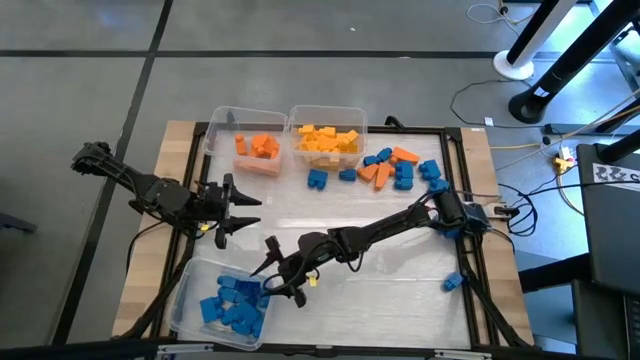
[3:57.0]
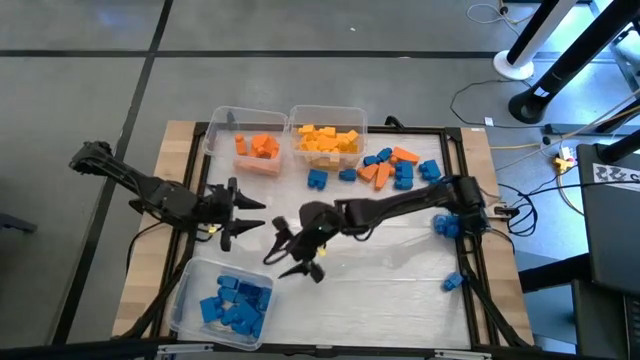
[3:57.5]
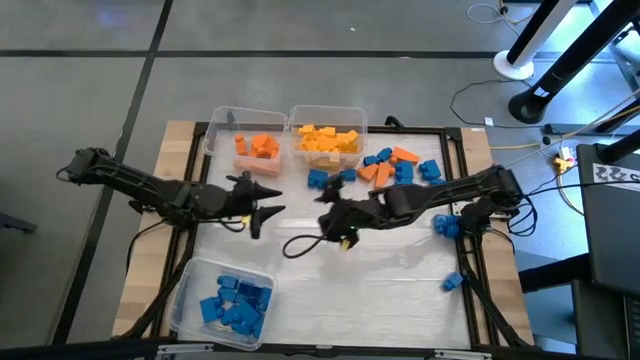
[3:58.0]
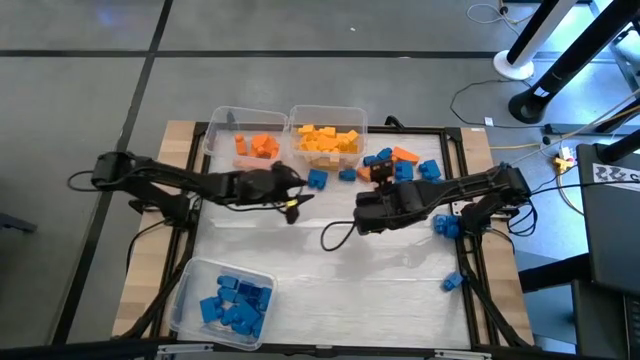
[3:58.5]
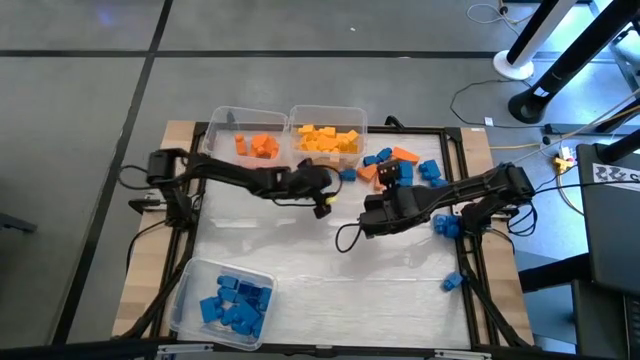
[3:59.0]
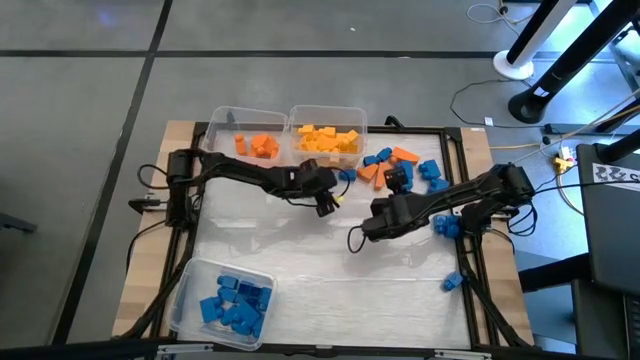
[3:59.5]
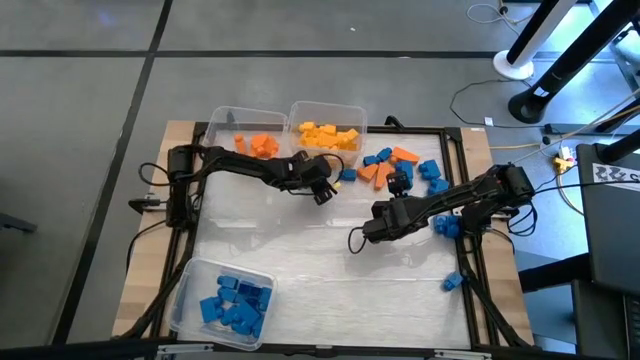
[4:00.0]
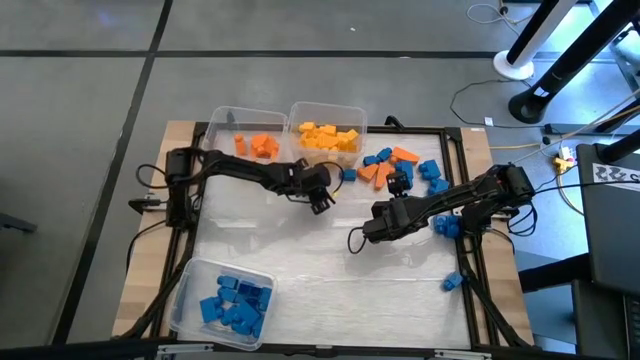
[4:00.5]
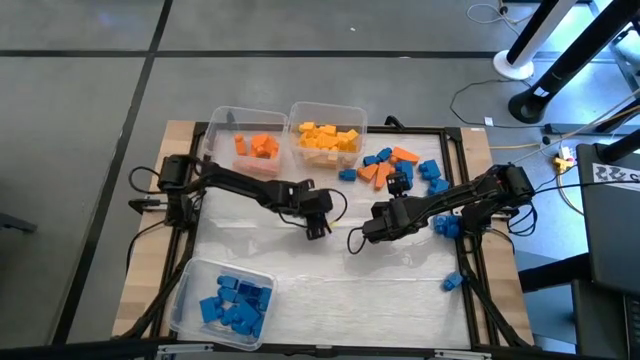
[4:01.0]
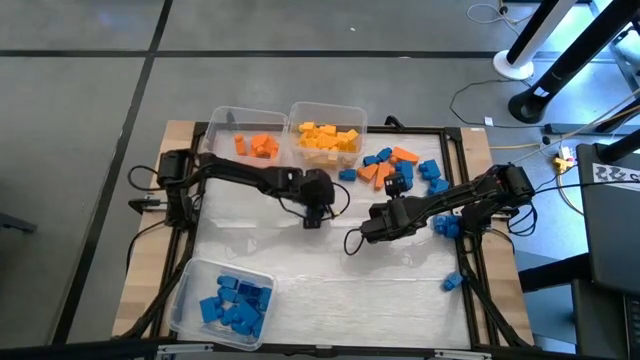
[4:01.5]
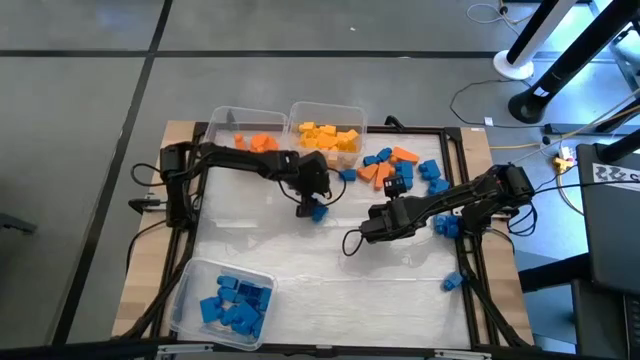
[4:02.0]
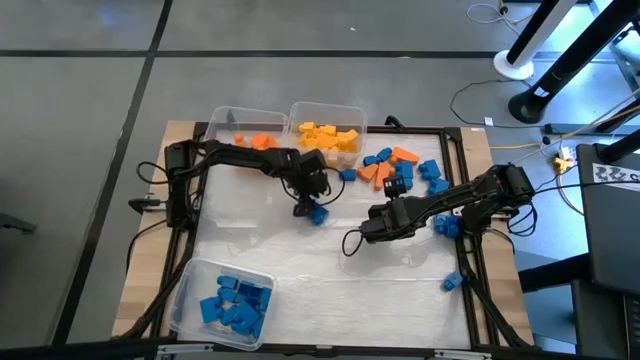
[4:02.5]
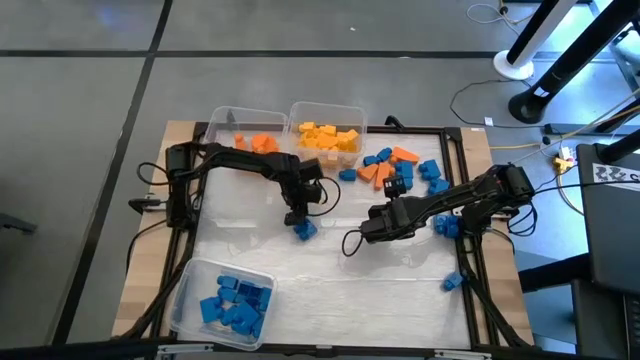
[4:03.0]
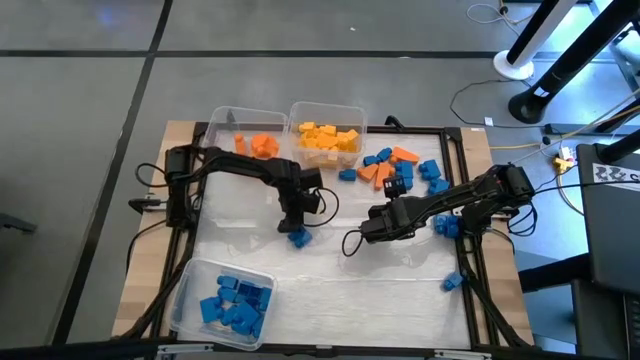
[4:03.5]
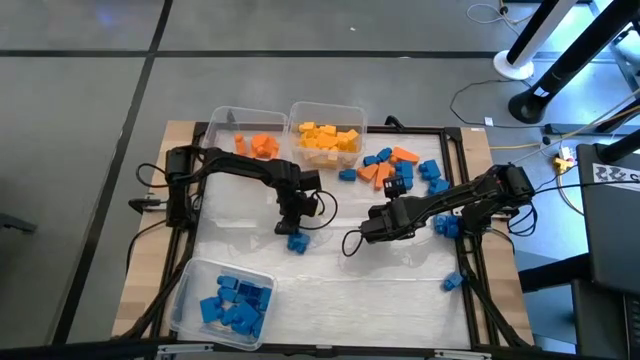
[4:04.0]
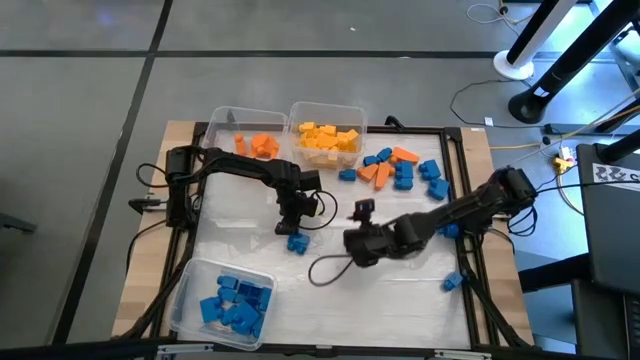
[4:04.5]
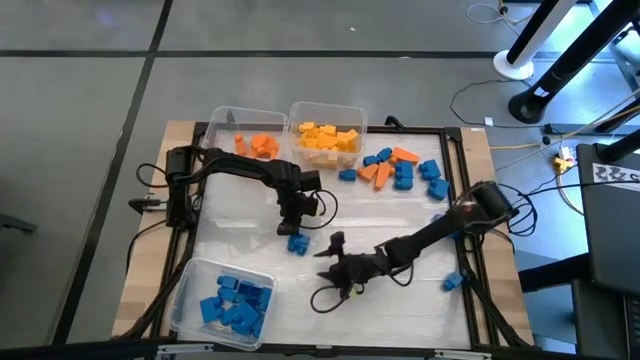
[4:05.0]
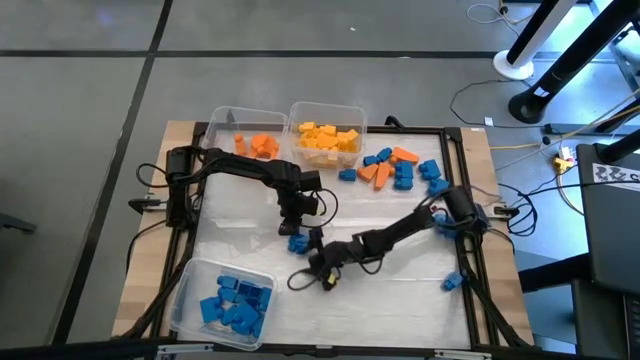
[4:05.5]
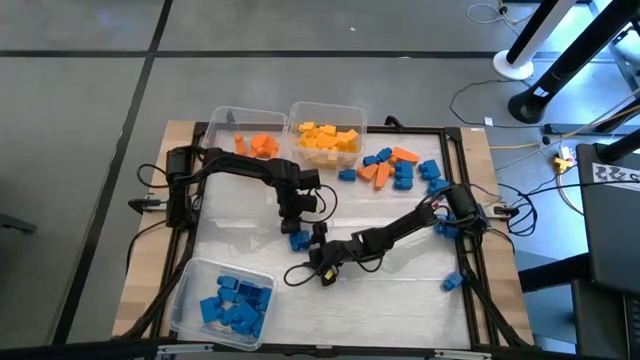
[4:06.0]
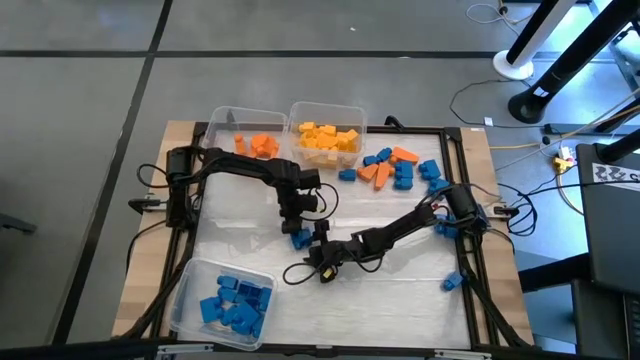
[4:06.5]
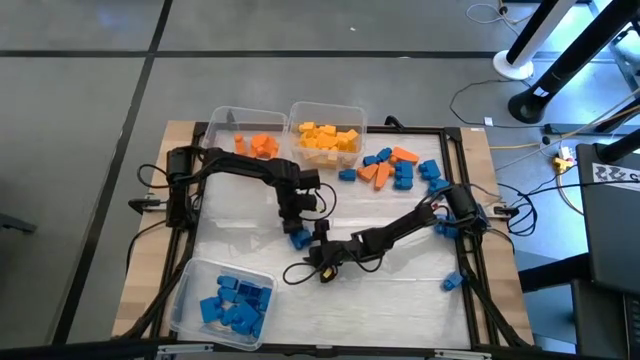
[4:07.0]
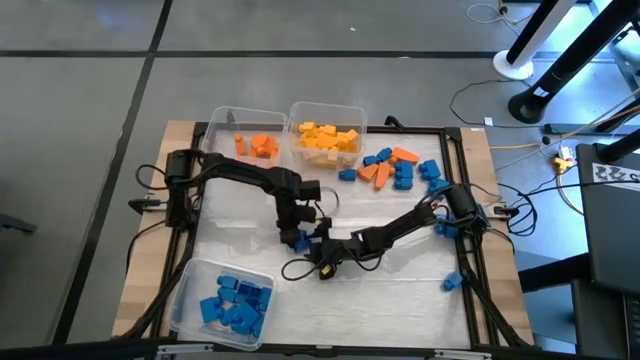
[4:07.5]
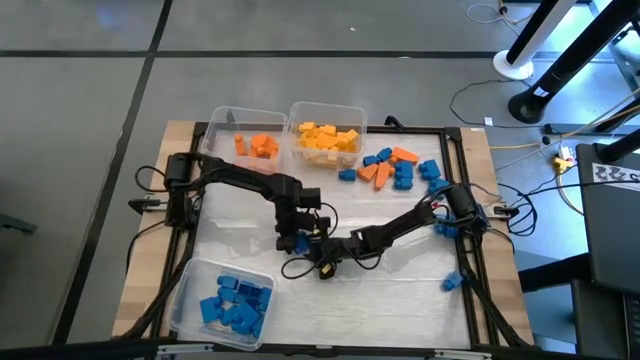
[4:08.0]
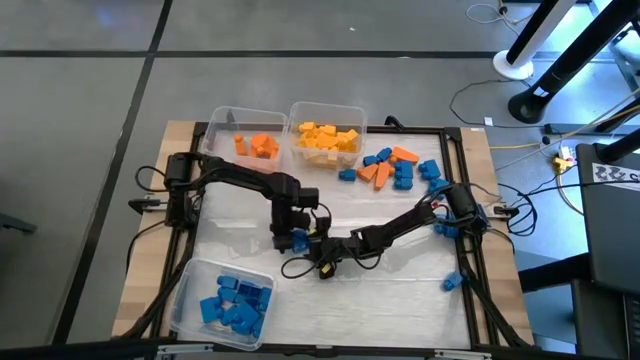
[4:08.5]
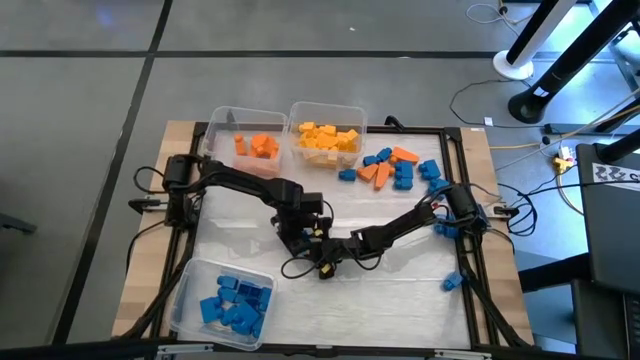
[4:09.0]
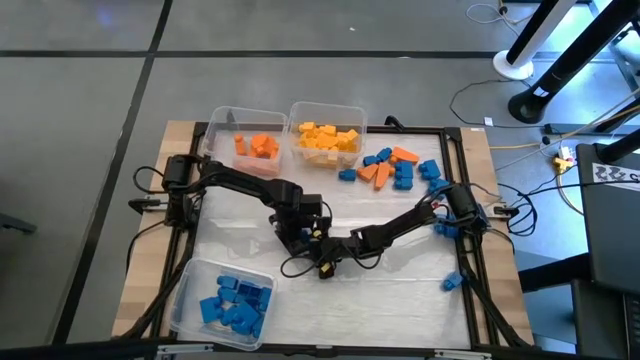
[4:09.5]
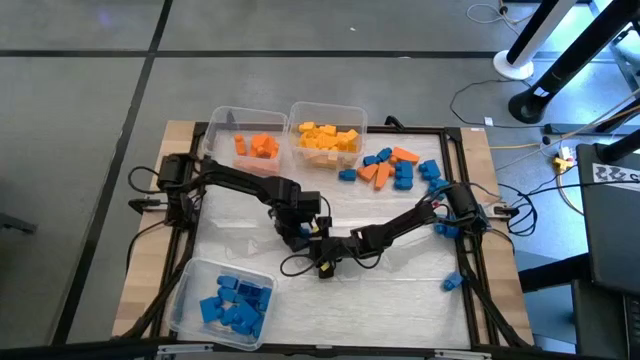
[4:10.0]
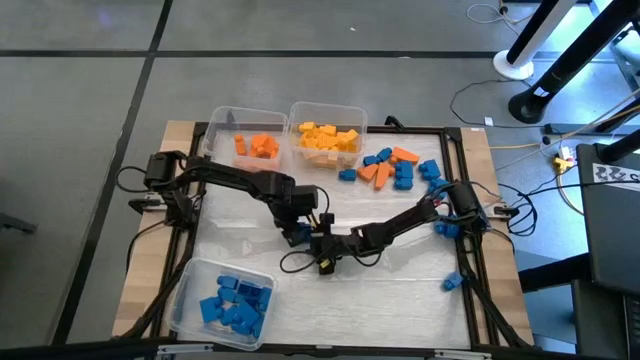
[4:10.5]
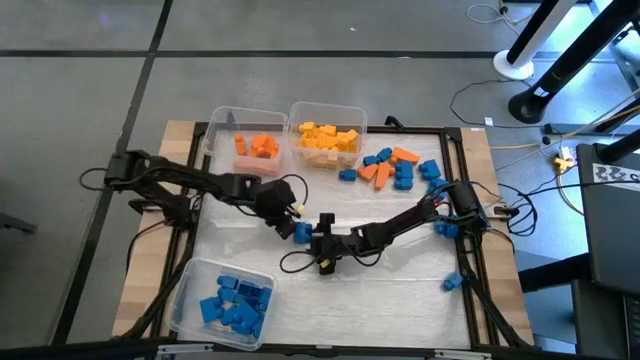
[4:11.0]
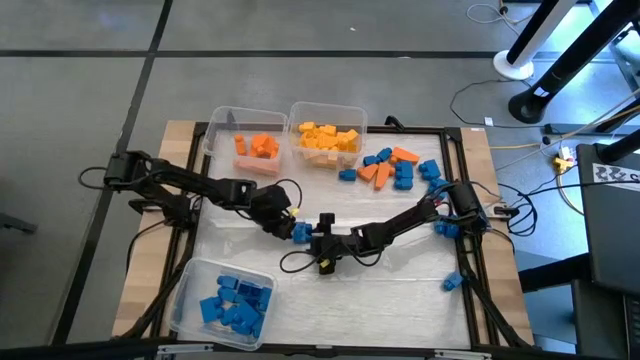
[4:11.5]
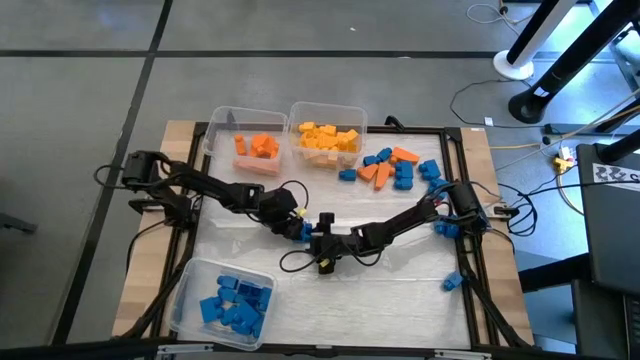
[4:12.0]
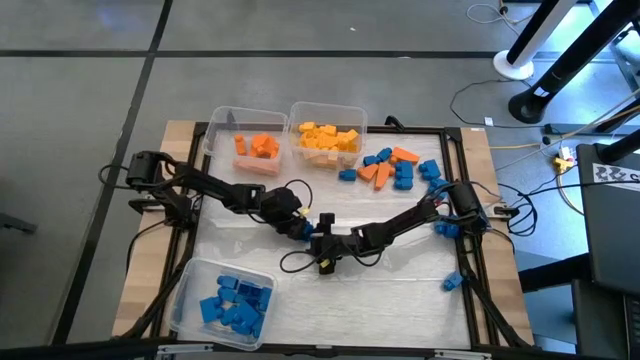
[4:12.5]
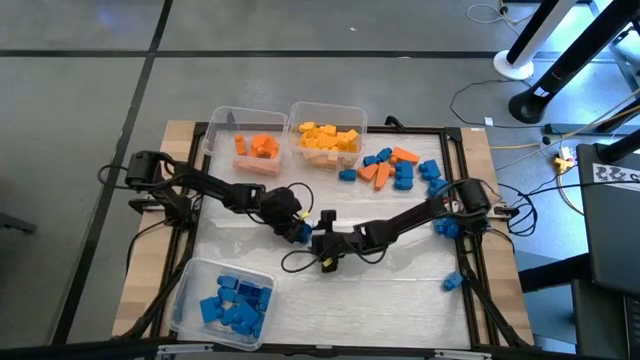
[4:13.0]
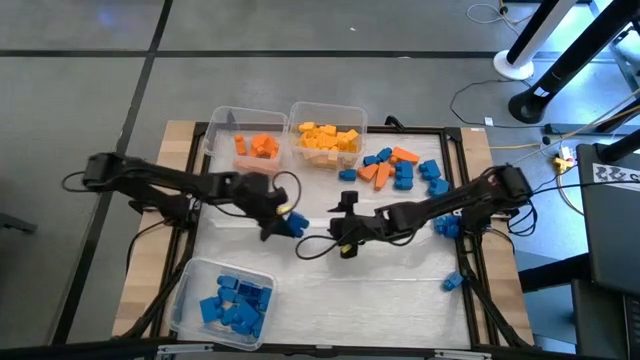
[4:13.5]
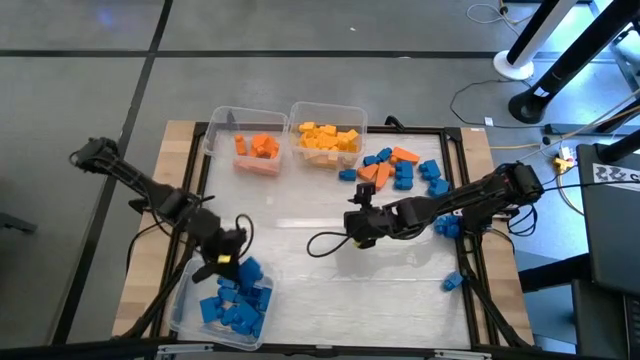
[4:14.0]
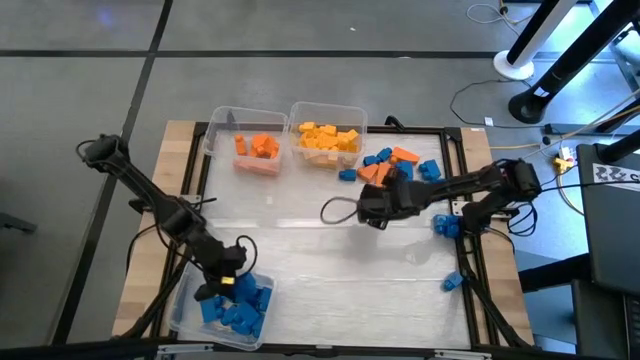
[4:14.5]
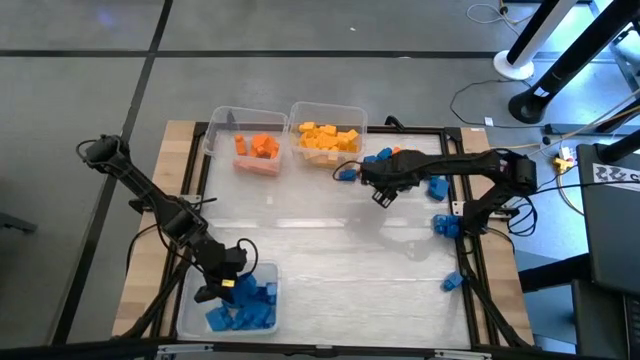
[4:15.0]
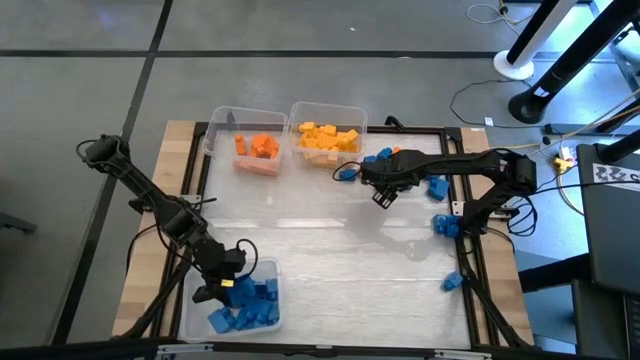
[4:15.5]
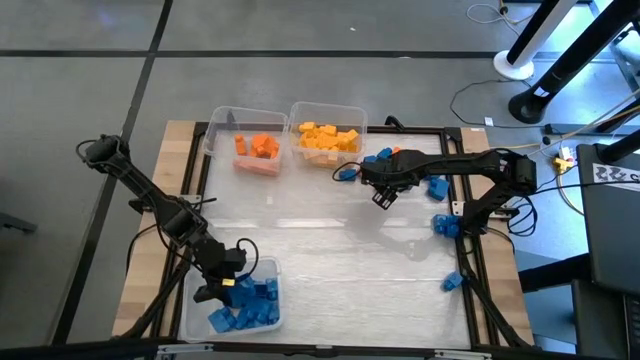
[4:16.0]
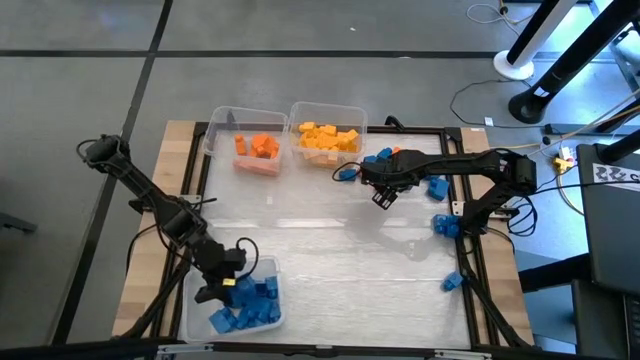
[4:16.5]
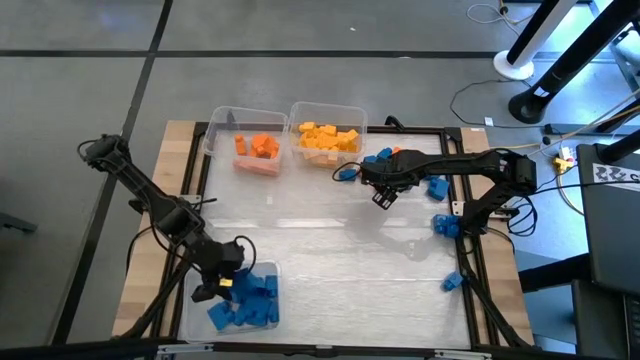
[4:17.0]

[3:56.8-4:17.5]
Task: Sort blocks
Put the blue game piece into the bottom transparent bin

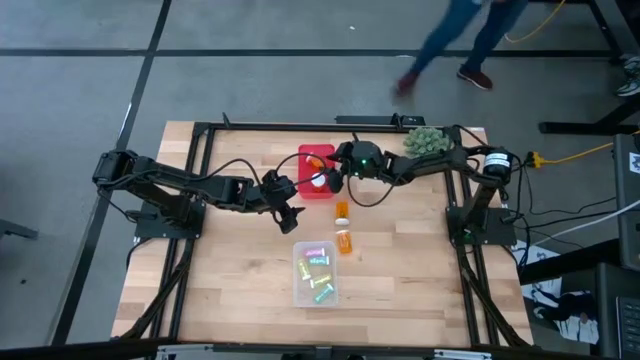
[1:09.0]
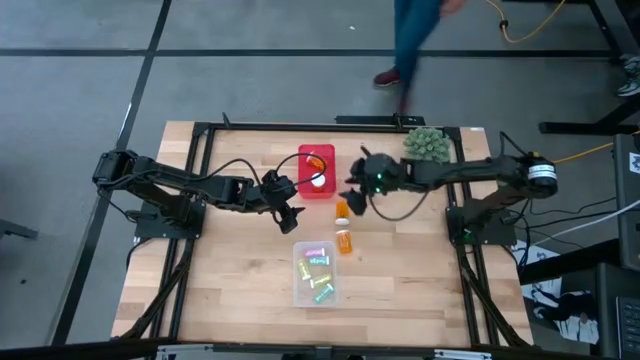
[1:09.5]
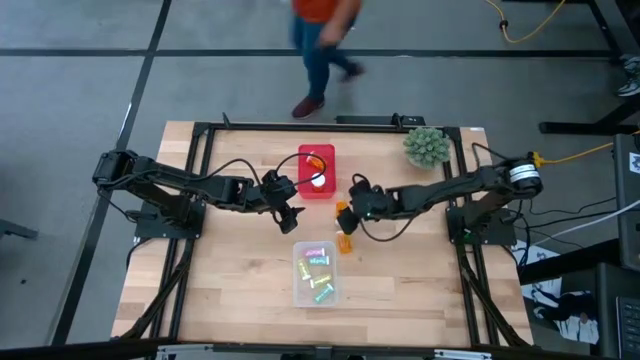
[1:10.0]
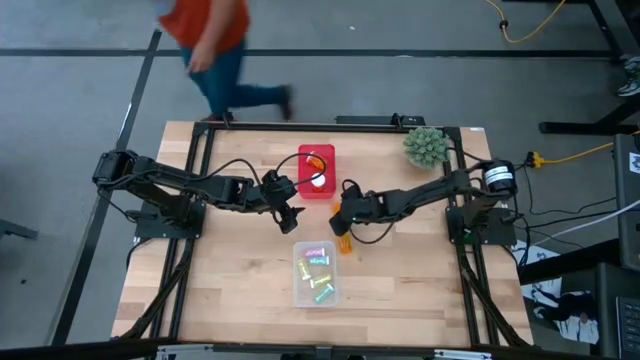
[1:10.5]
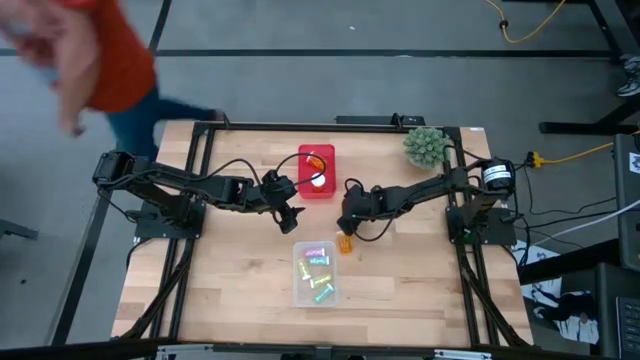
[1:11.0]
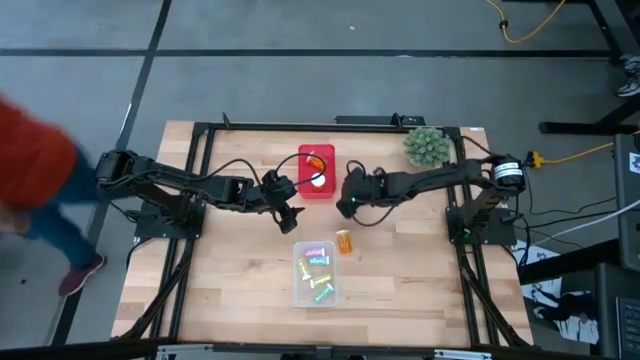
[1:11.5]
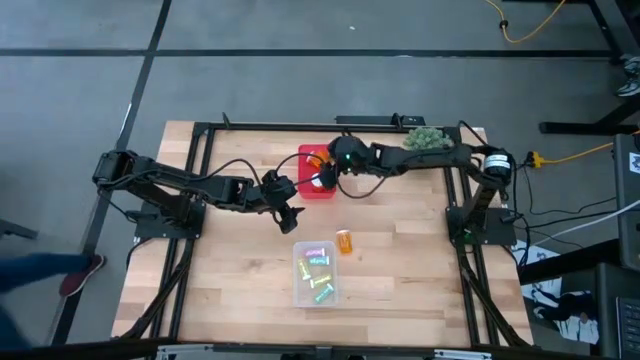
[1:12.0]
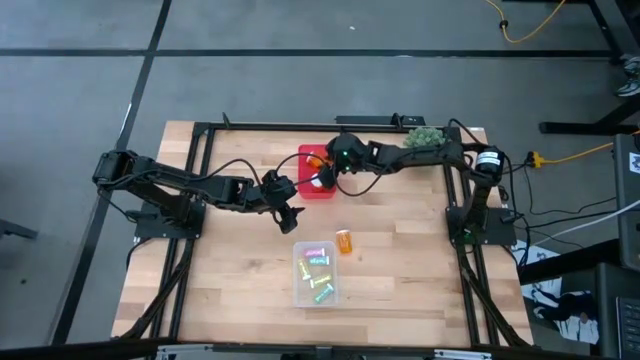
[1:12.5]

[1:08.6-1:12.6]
Task: Pick and place medicine bottles into bin by pill shape (circle, oval)
Put the large orange pill bottle into the red bin
